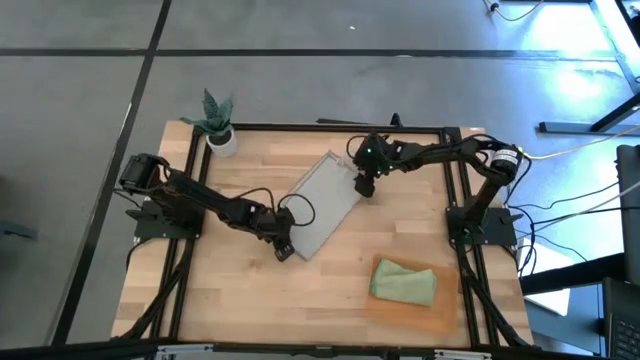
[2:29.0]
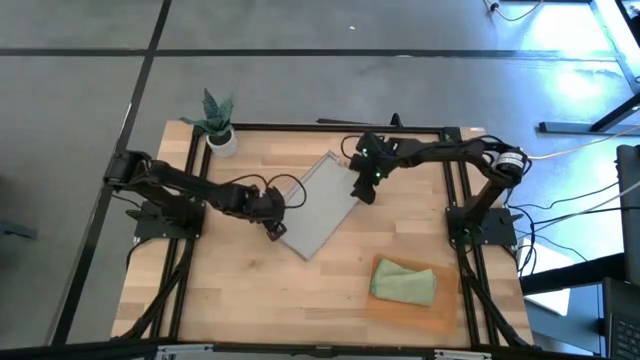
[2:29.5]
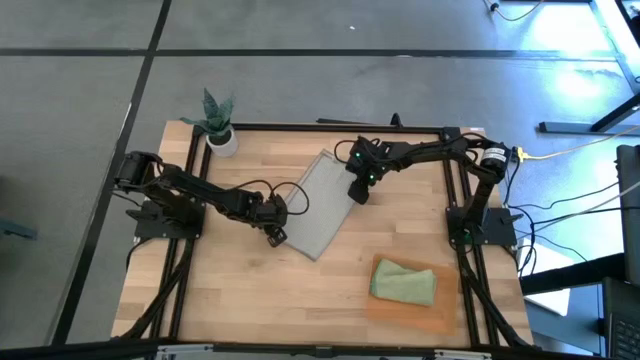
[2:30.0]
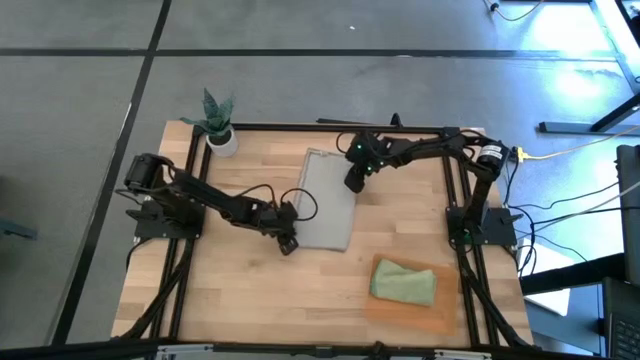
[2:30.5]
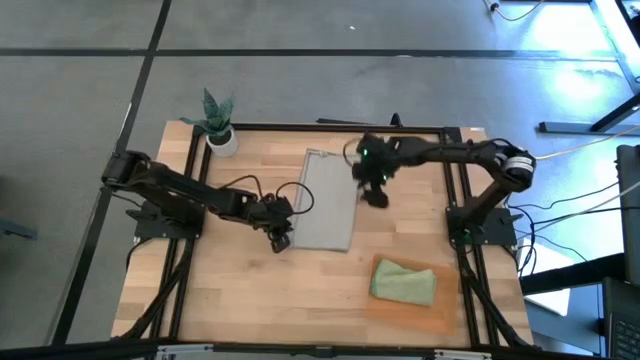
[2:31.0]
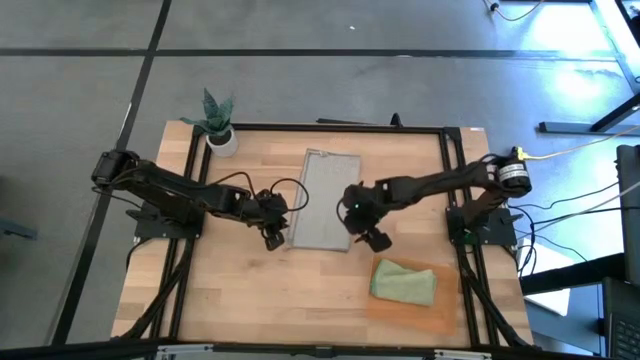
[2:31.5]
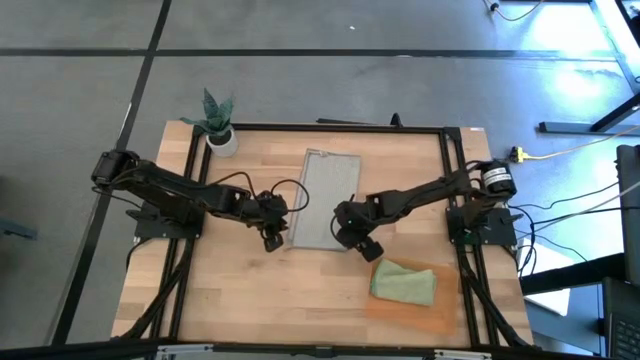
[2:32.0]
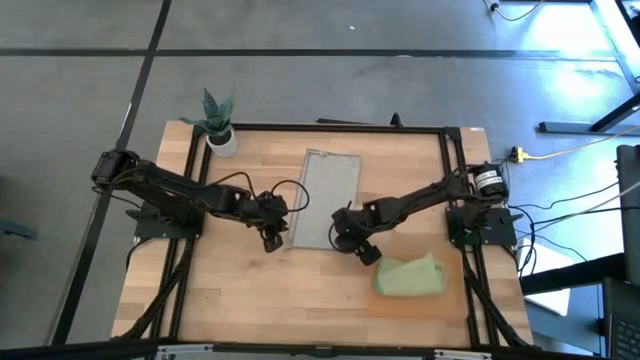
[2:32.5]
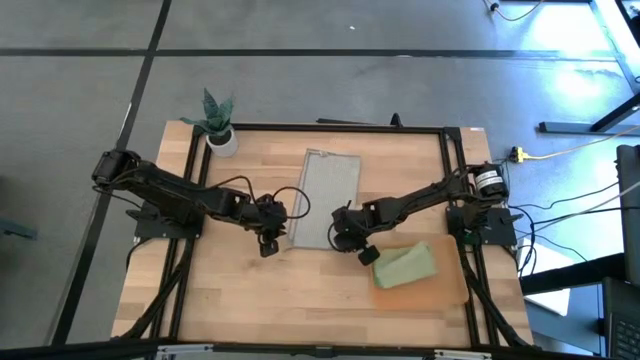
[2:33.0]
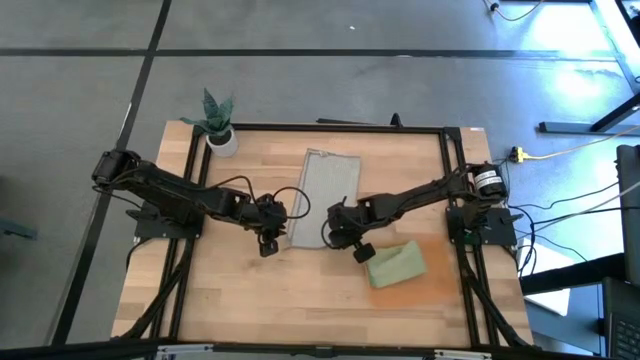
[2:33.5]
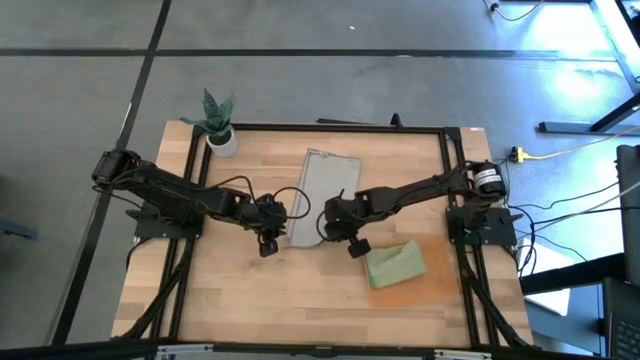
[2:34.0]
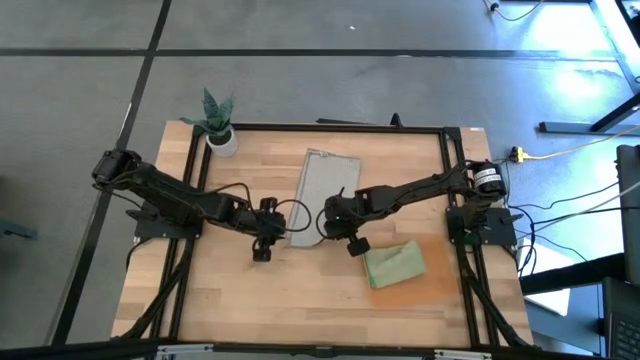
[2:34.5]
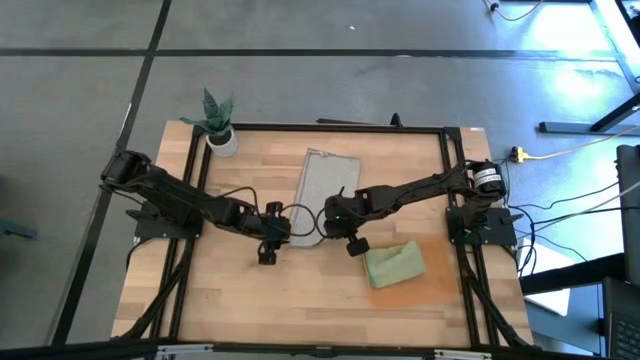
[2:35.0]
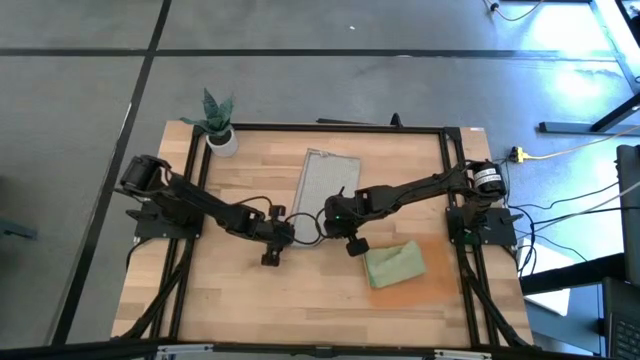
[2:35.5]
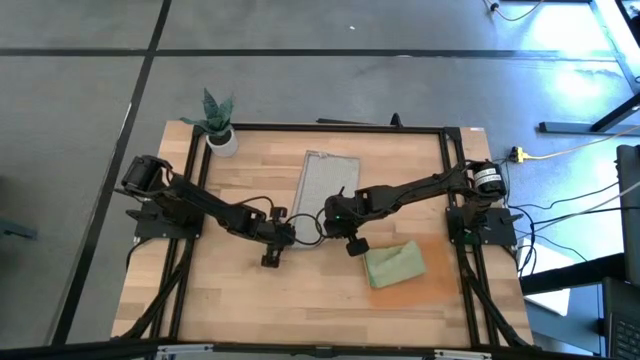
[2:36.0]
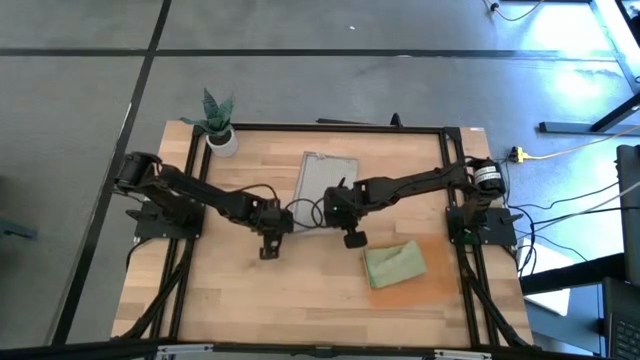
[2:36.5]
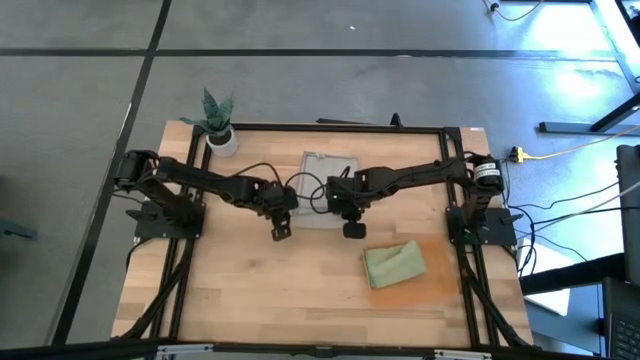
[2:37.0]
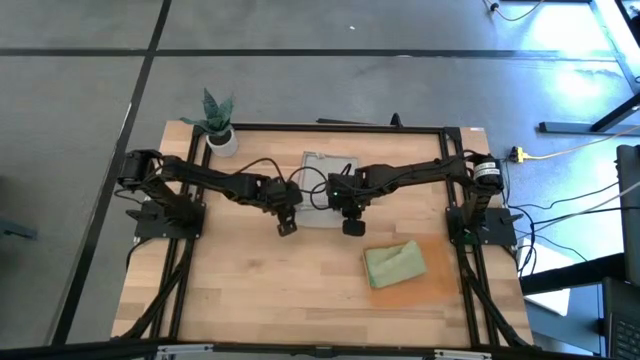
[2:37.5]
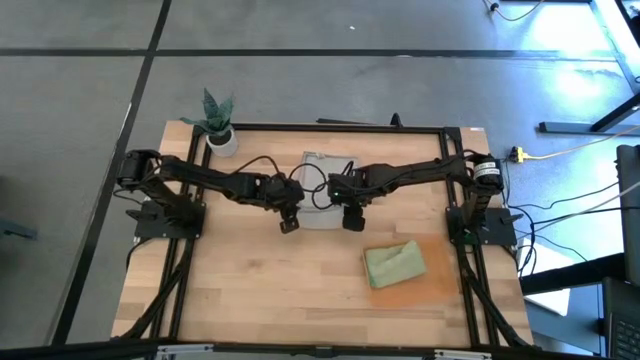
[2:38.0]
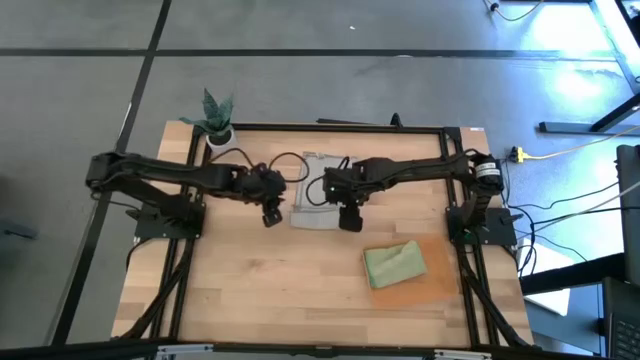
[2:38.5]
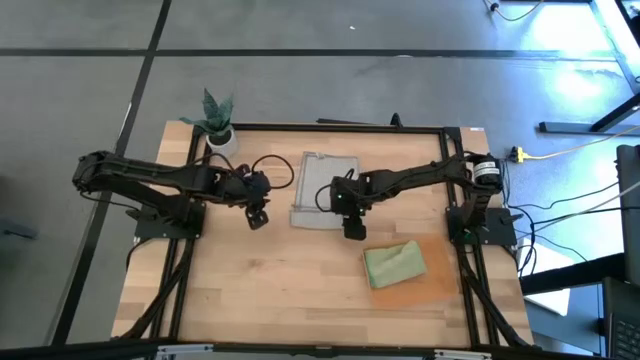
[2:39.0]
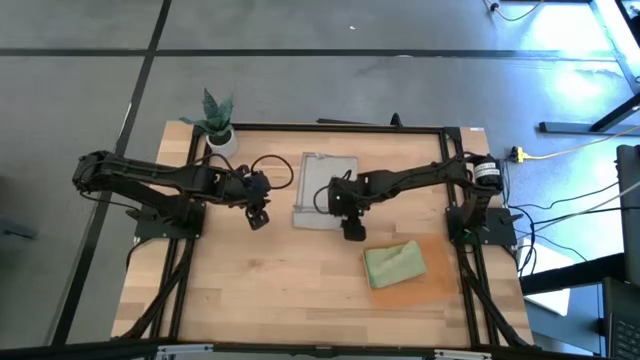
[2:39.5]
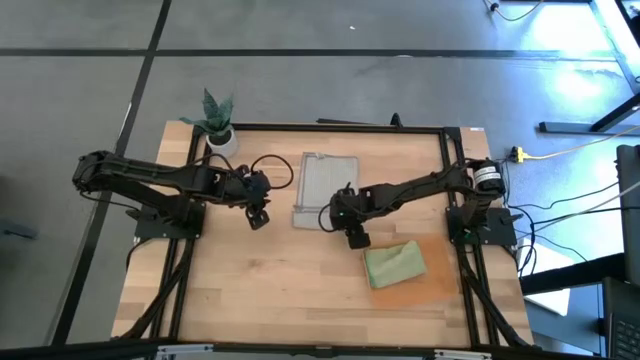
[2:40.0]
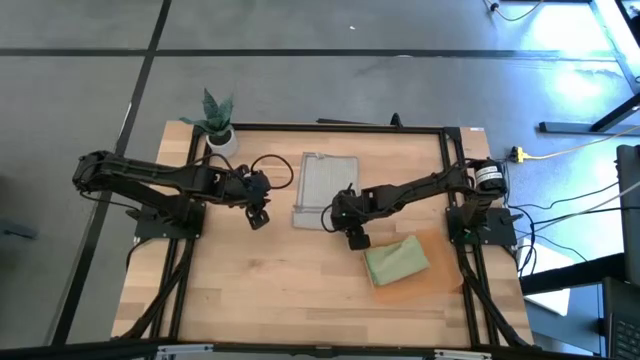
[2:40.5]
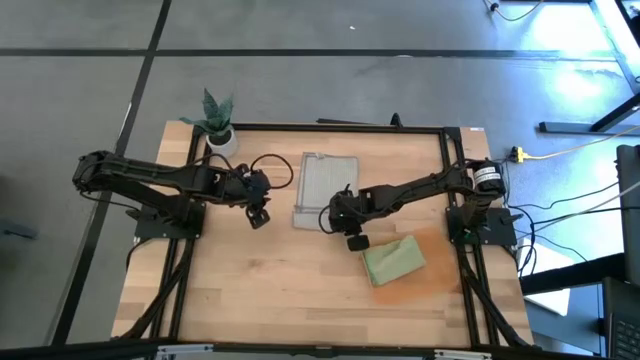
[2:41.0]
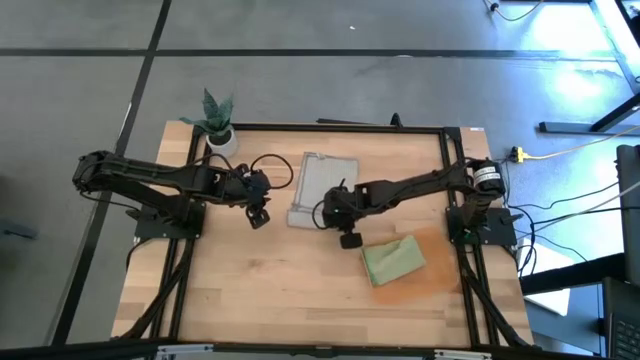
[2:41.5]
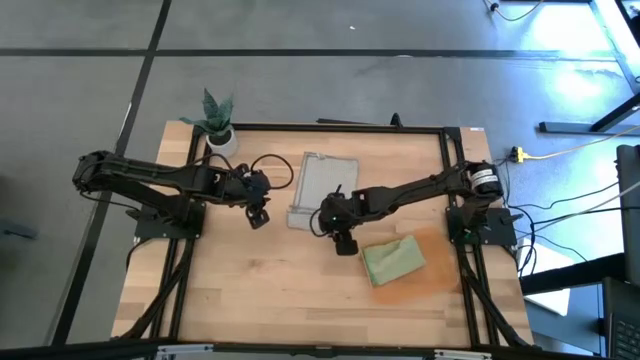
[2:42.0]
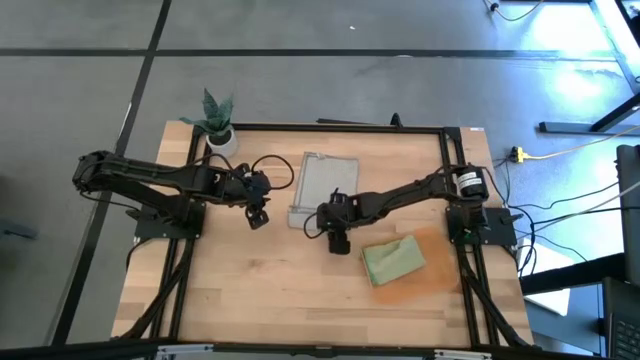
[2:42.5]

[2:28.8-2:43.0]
Task: Roll microfiber towels into tight, uniform cylinder then place into a basket
Roll the gray microfiber towel

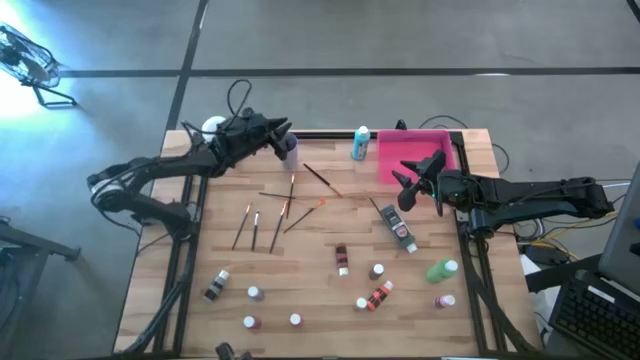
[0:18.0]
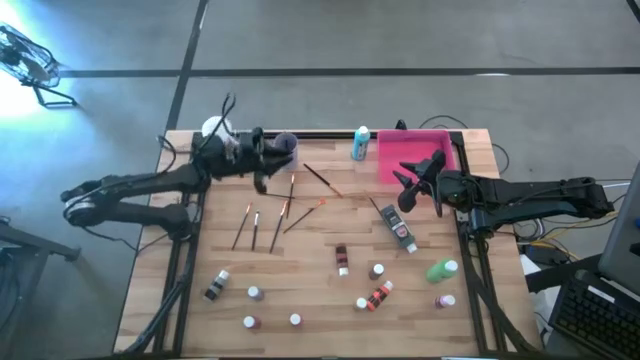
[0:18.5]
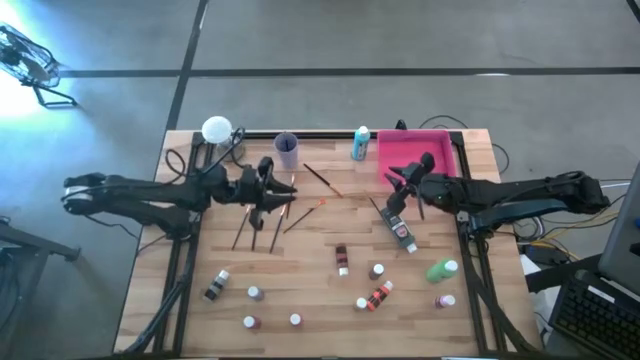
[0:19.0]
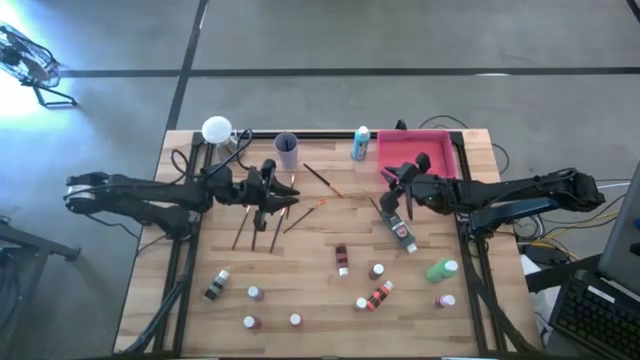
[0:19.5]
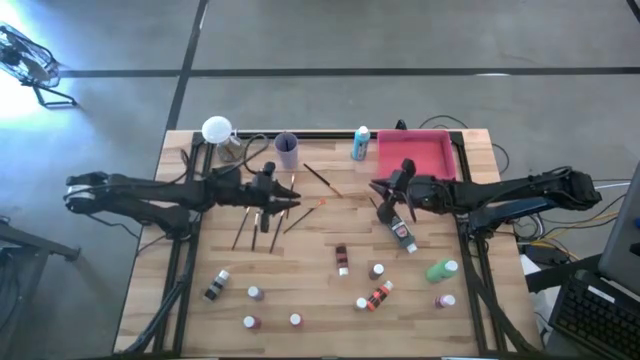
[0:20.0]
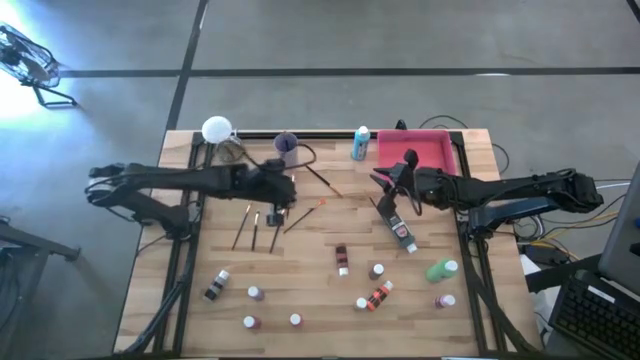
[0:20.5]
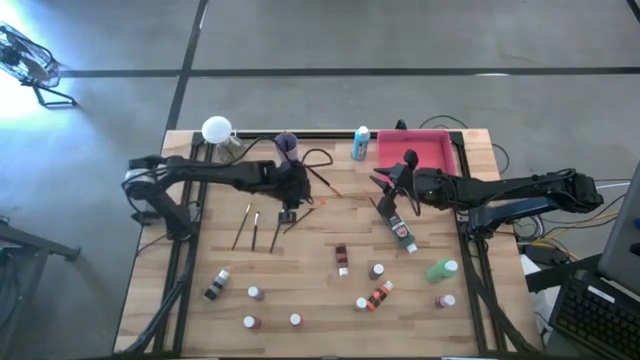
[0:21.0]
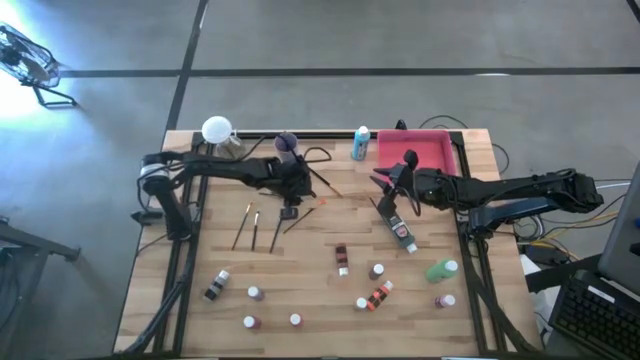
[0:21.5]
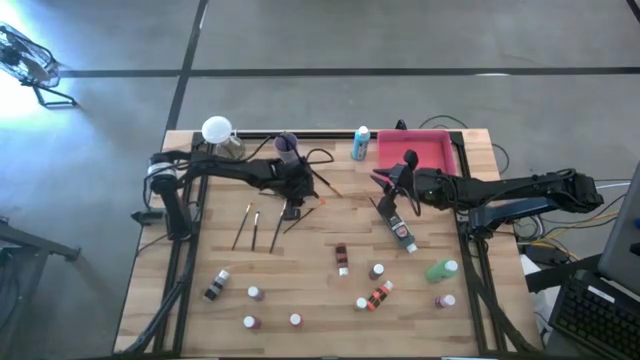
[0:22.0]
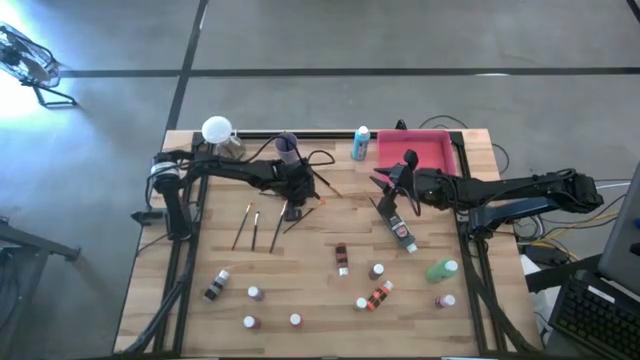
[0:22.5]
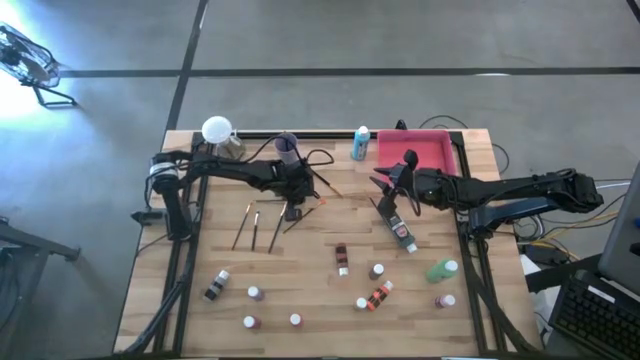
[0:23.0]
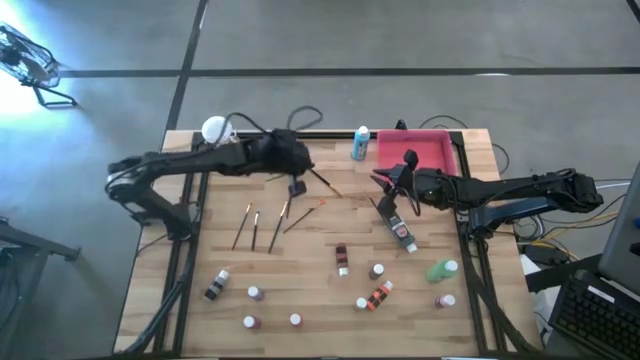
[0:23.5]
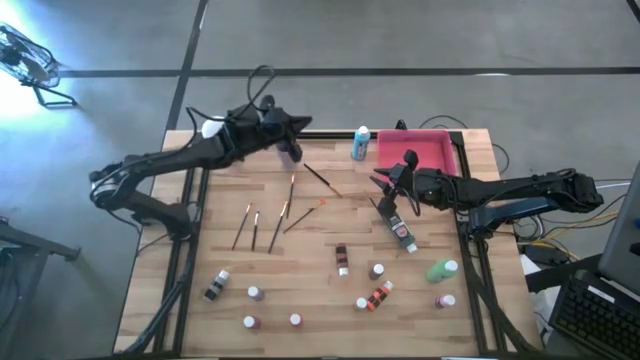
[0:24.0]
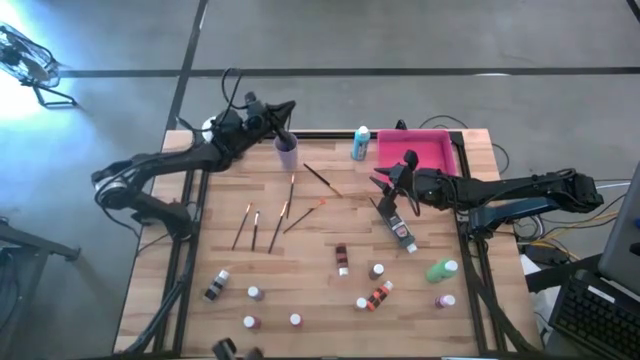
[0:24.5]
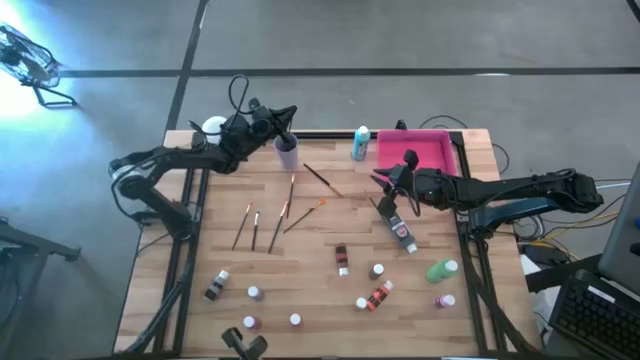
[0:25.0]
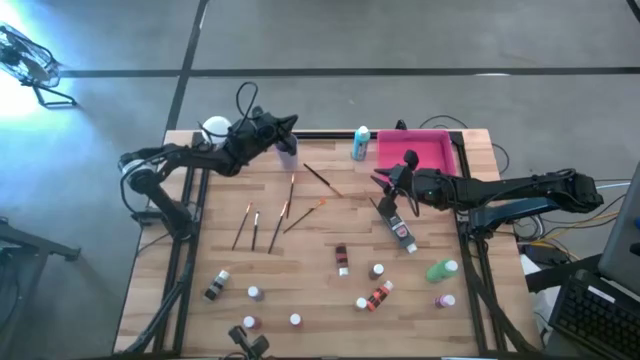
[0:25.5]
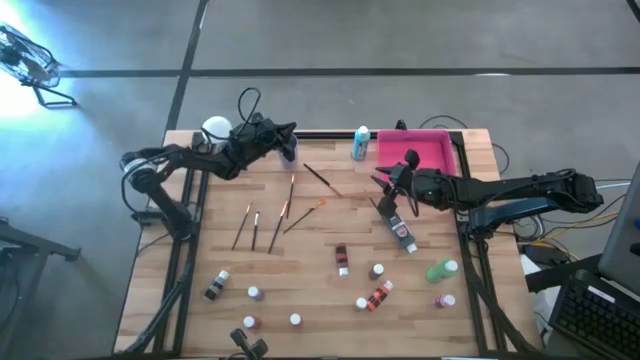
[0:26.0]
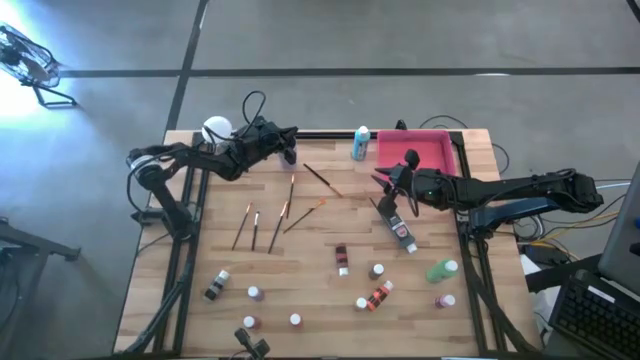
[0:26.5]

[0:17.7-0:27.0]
Task: Pick & Place Paint Supplies
Put the gold black paint brush into the purple cup
